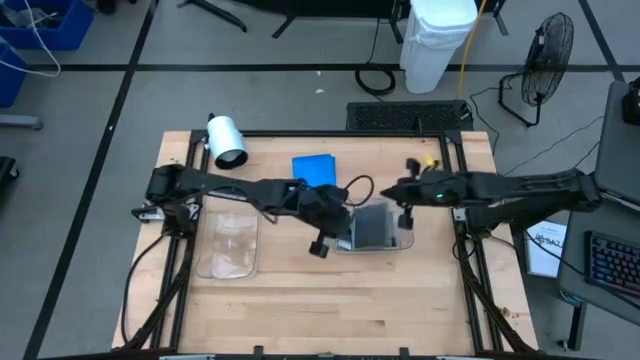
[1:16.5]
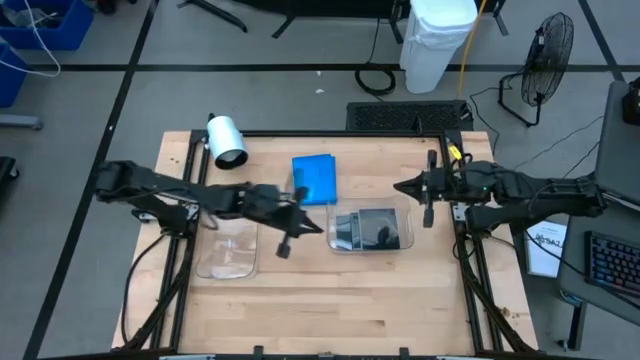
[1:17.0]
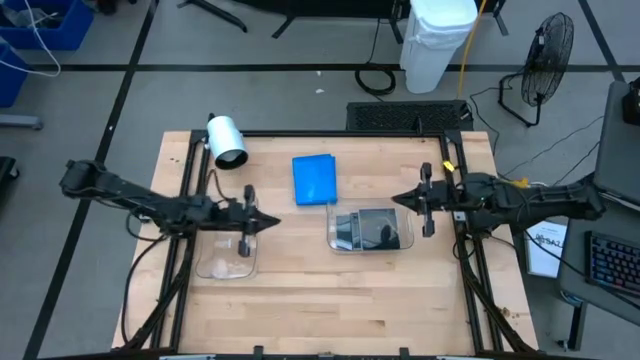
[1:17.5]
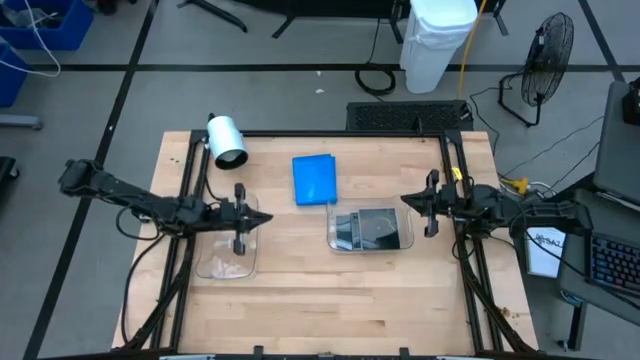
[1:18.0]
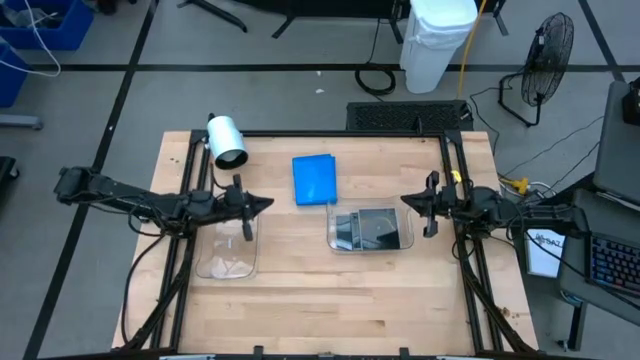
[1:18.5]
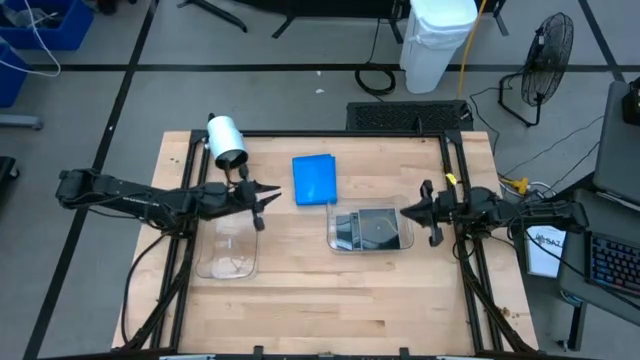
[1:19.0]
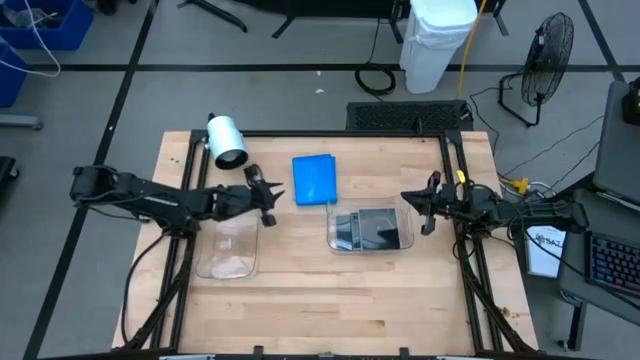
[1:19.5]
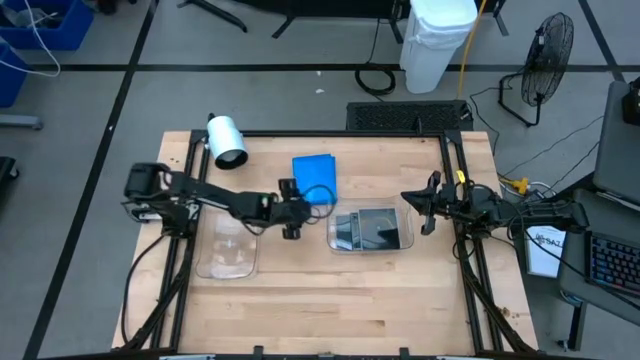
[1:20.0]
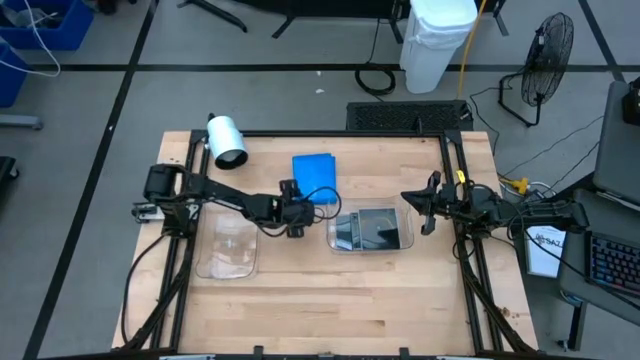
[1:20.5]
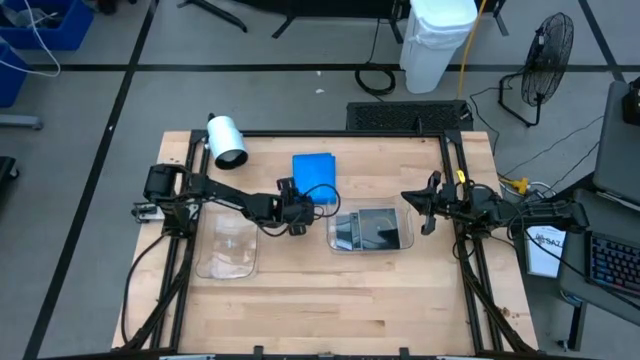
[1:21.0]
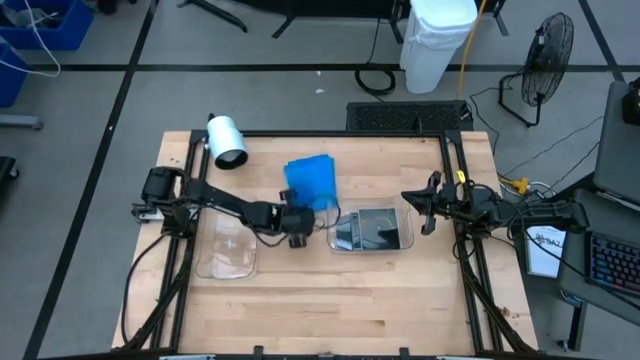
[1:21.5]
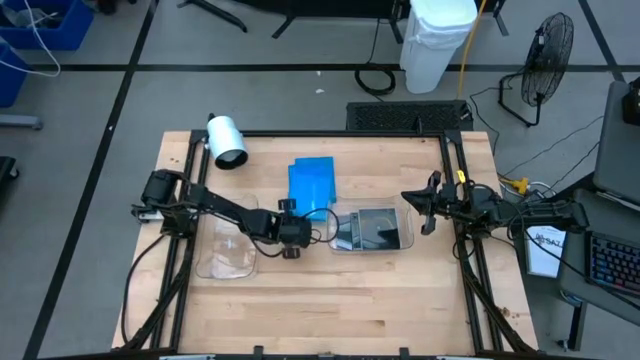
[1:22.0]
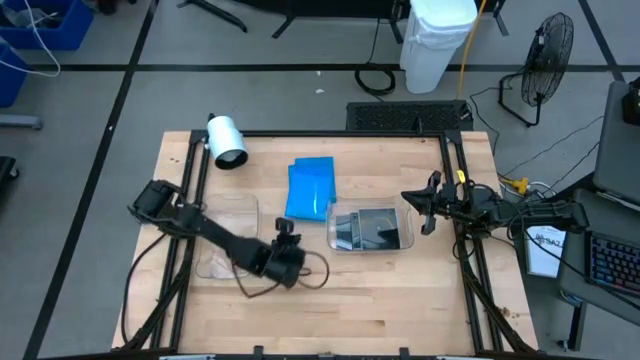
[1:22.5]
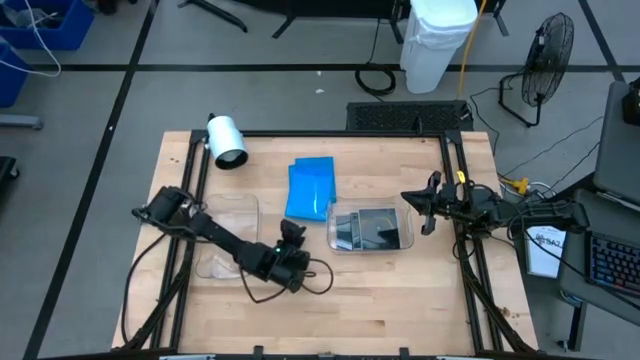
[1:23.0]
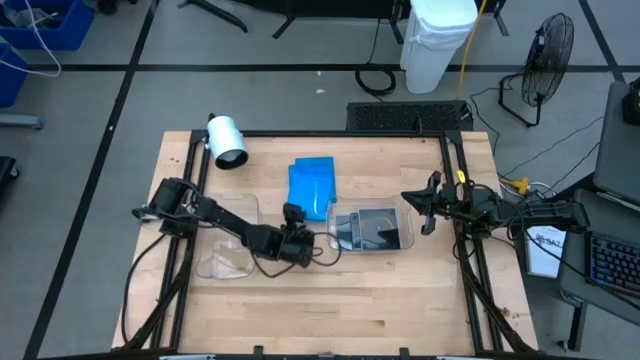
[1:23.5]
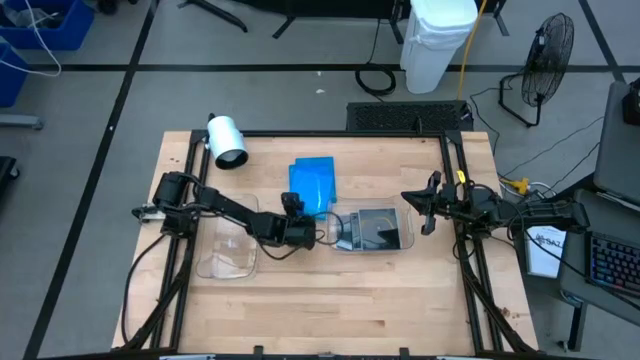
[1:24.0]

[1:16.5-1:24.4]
Task: Pick & place jewel cases by type
Put the blue CD case into the left transparent bin

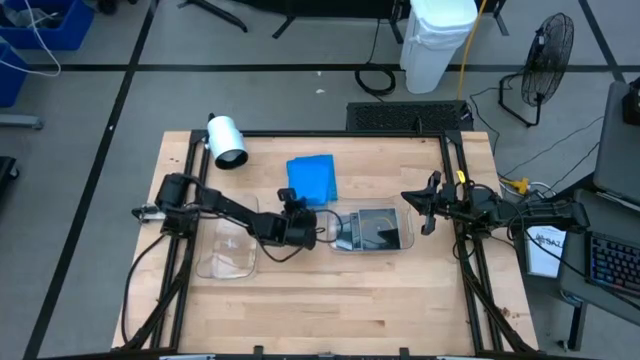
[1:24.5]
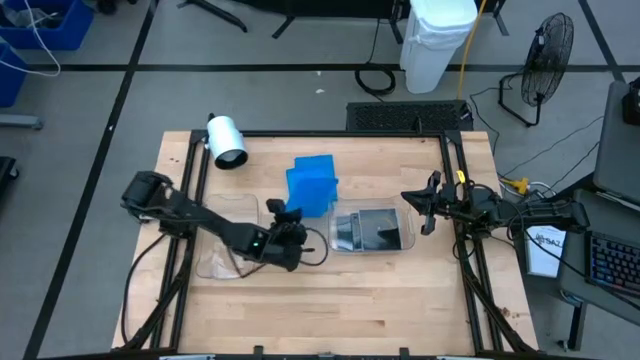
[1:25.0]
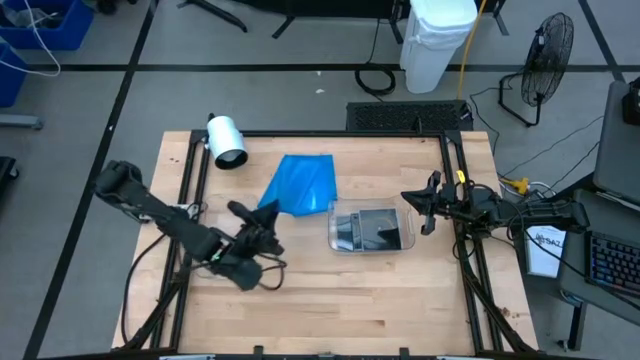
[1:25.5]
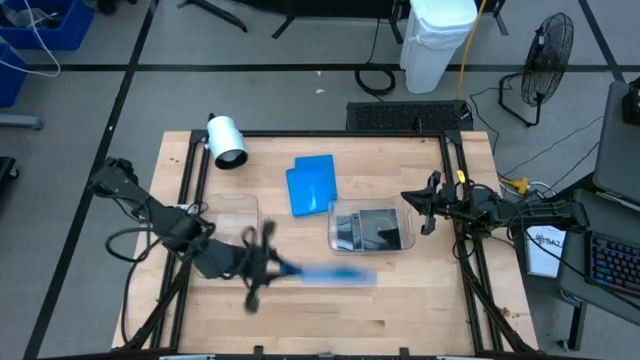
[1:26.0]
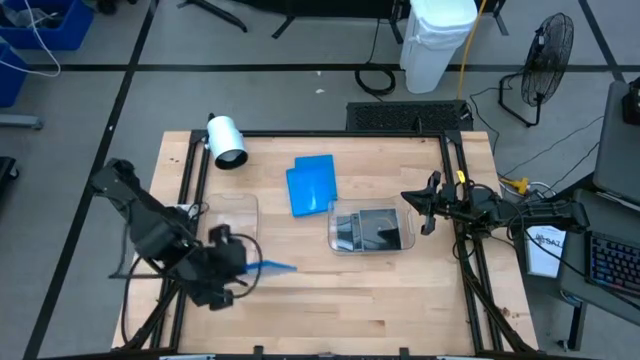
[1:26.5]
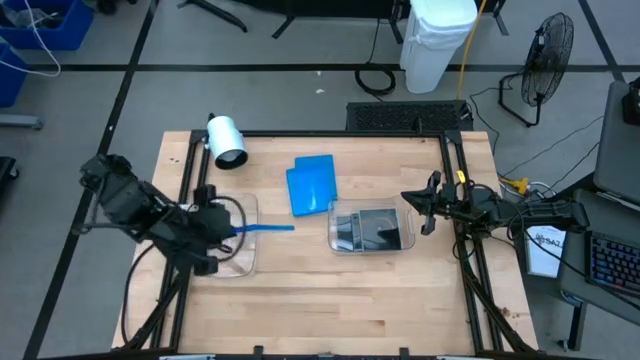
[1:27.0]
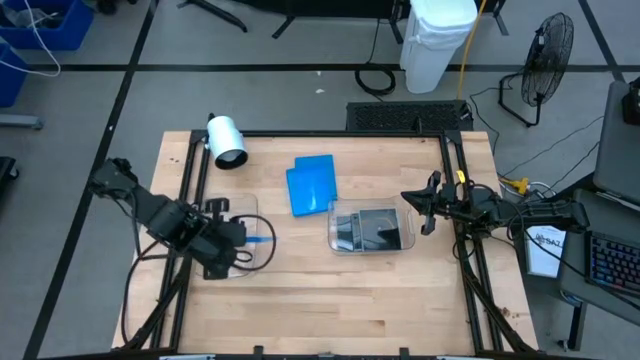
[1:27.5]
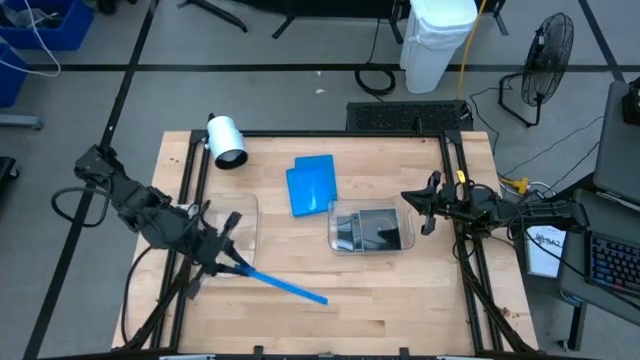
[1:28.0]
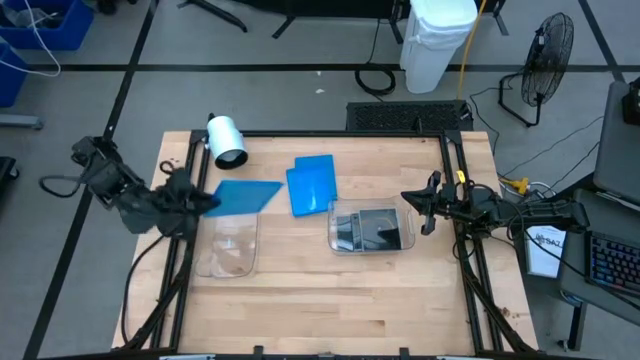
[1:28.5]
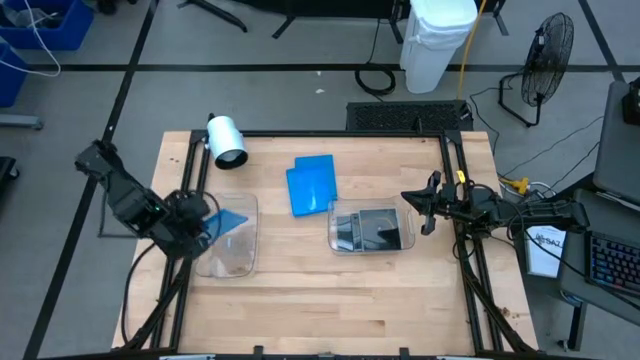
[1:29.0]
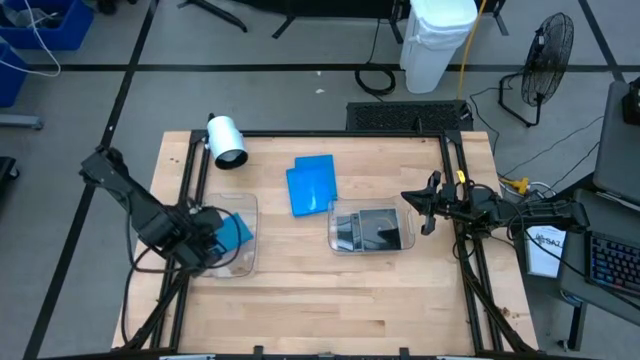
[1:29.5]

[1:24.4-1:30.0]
Put the blue CD case into the left transparent bin

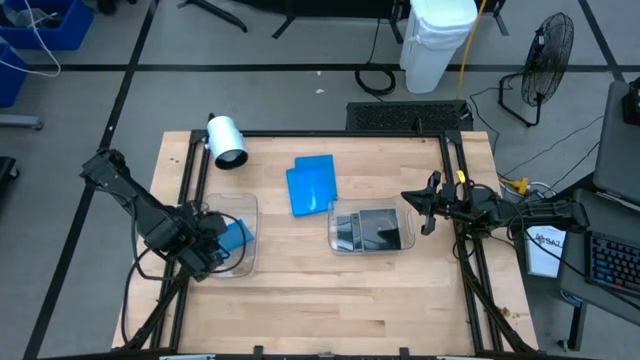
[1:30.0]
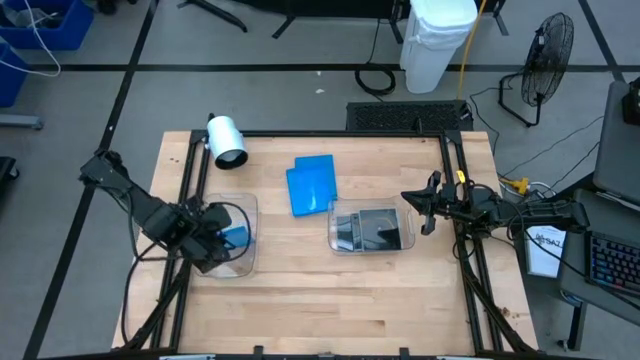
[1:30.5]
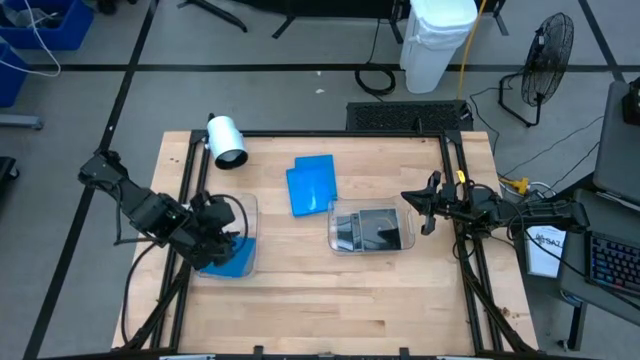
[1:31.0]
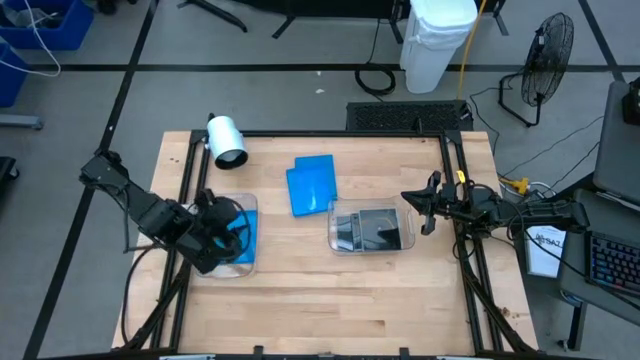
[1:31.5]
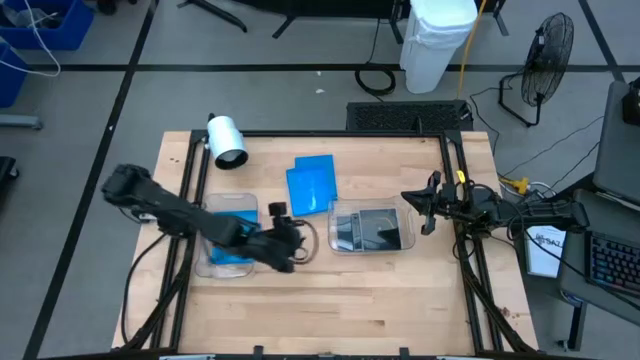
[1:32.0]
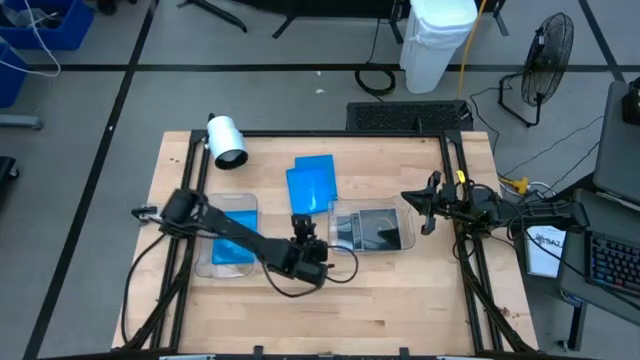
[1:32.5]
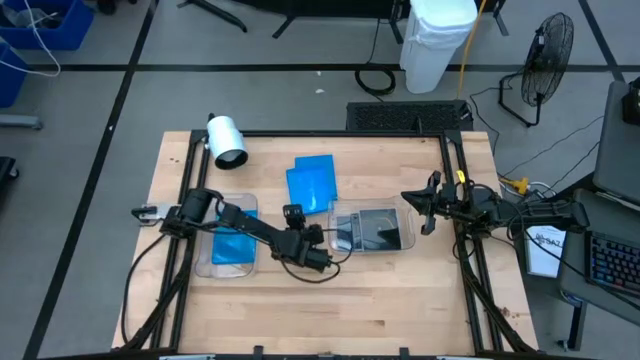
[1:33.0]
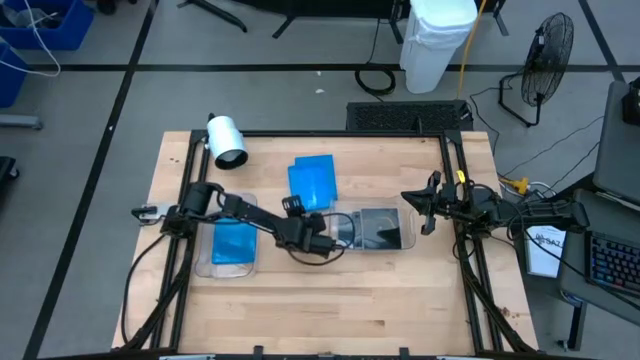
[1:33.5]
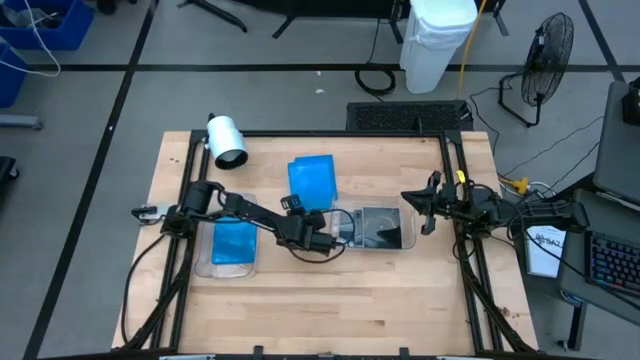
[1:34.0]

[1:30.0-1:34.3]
Put the blue CD case into the left transparent bin

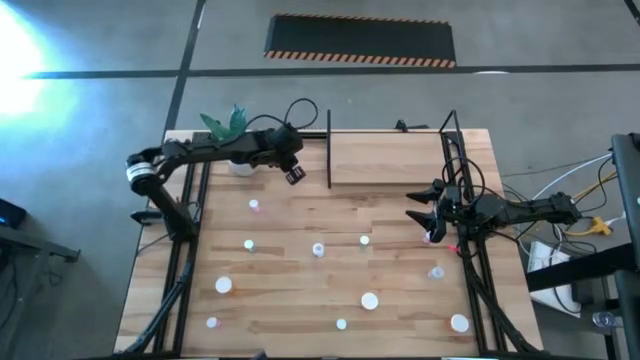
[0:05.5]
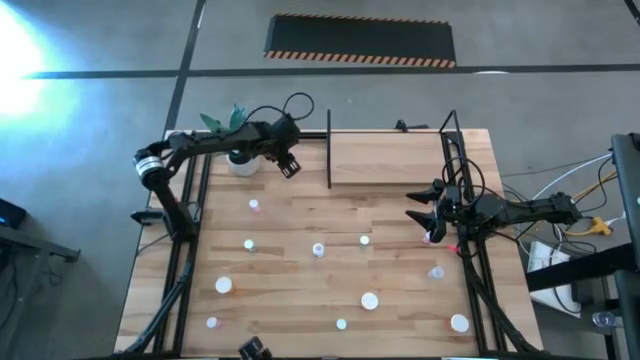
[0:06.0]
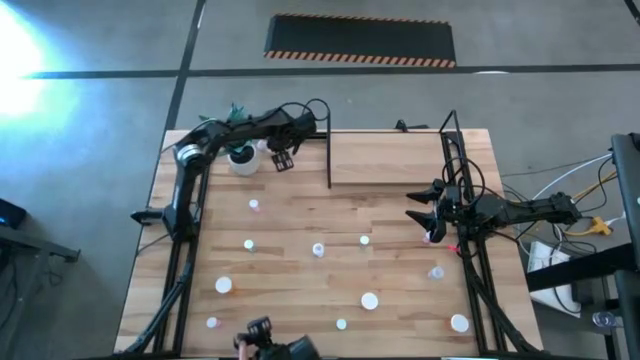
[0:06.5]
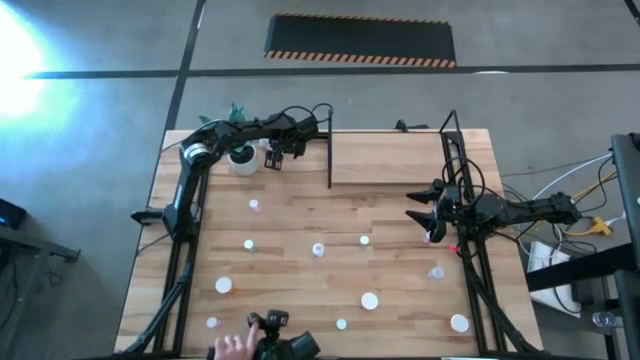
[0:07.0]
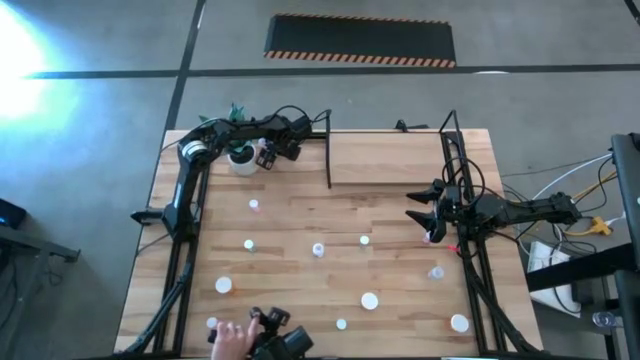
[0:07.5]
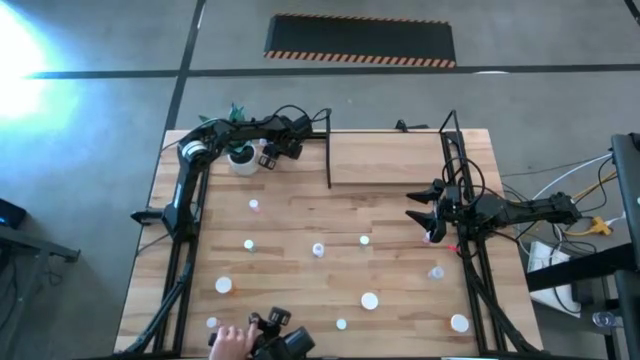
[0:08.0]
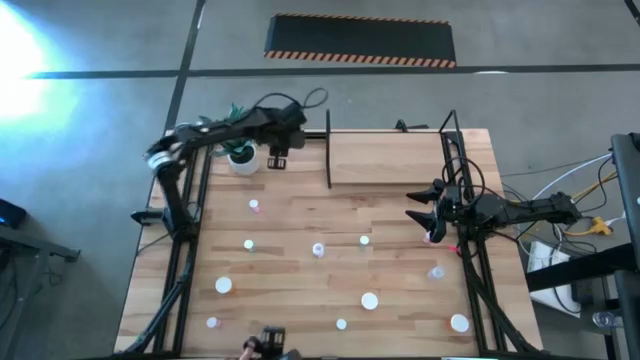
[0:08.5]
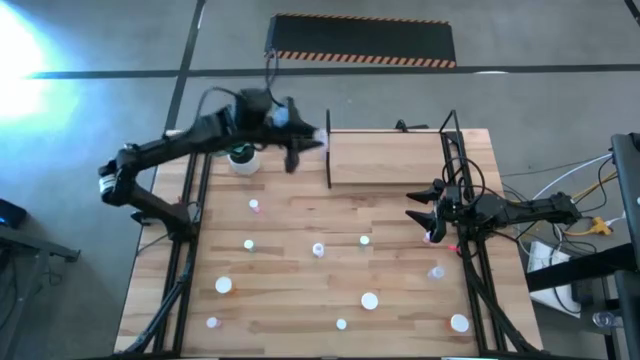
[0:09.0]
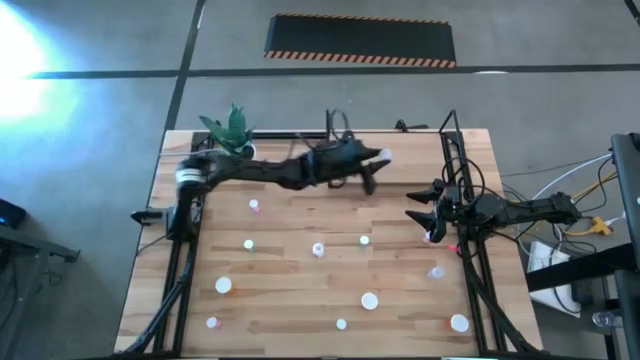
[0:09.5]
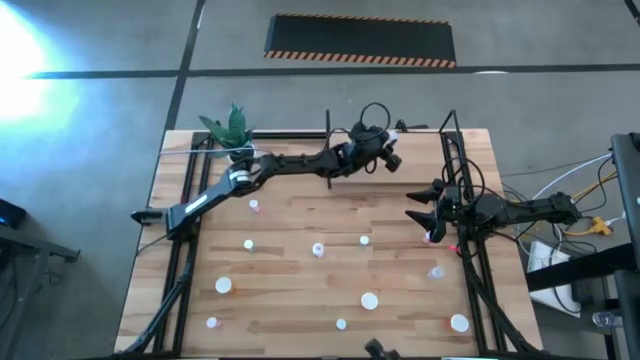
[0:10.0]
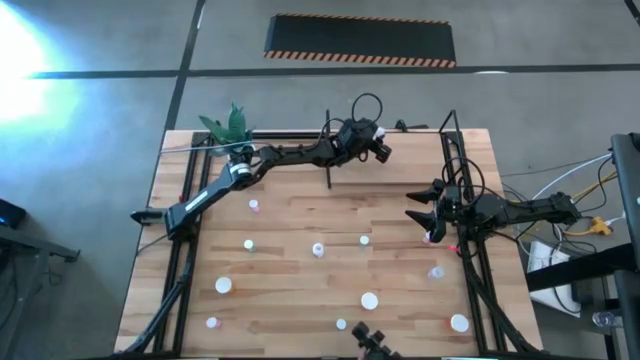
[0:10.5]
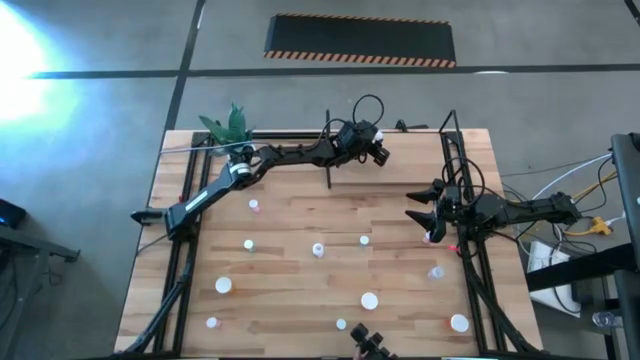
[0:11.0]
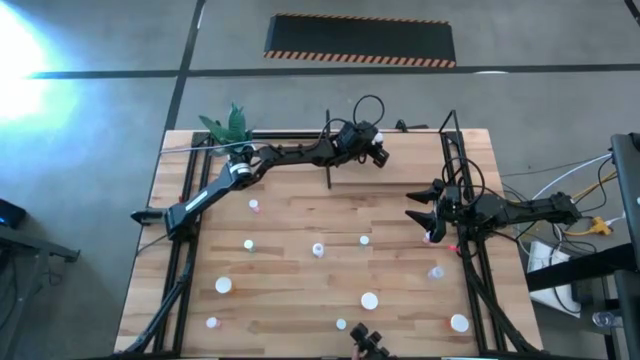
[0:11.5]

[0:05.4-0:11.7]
Task: Pick and place medicine bottles onto shelf by color
Put the top transparent pill bottle on the shelf
